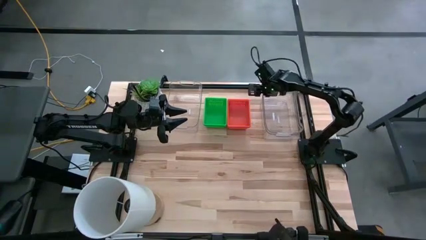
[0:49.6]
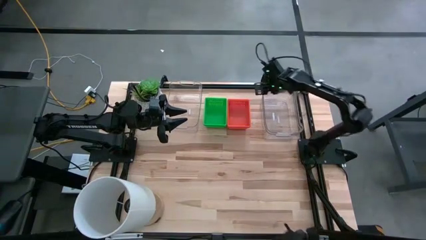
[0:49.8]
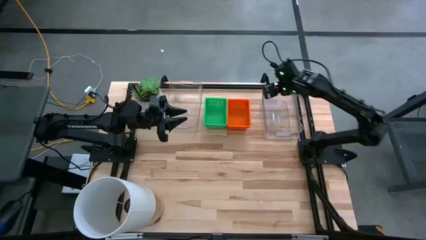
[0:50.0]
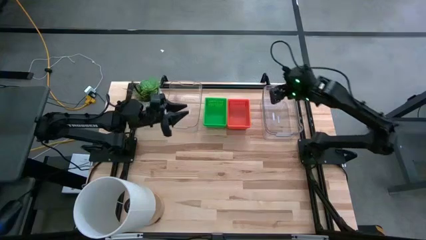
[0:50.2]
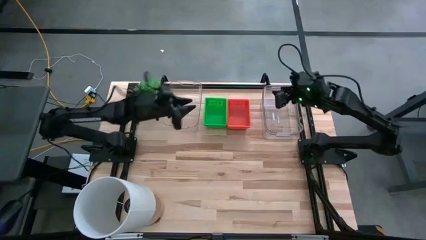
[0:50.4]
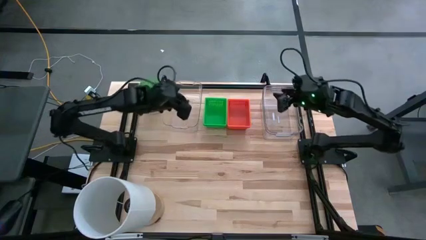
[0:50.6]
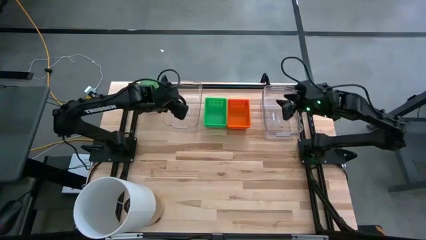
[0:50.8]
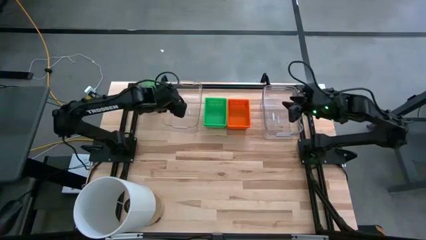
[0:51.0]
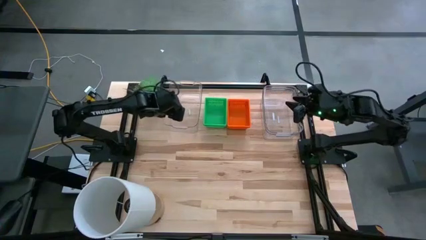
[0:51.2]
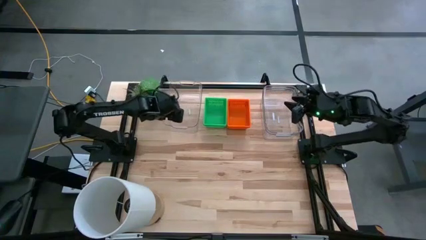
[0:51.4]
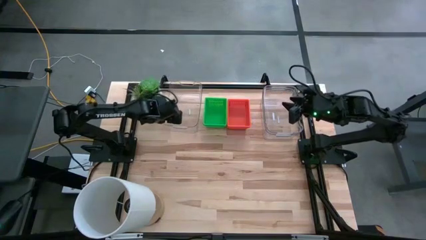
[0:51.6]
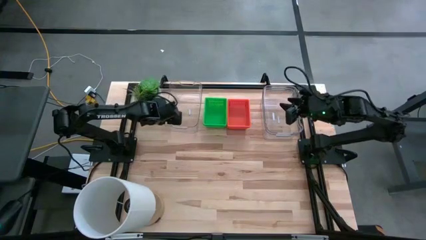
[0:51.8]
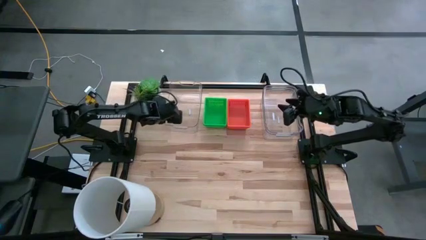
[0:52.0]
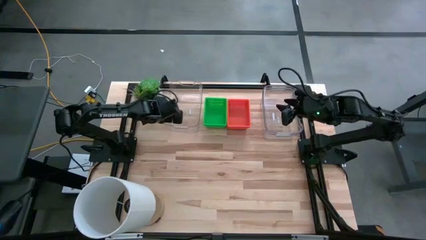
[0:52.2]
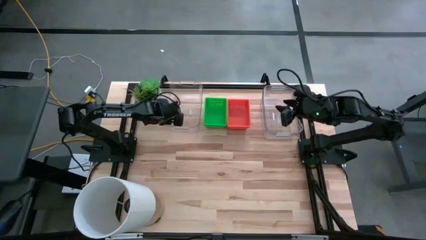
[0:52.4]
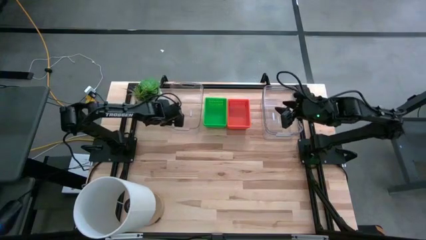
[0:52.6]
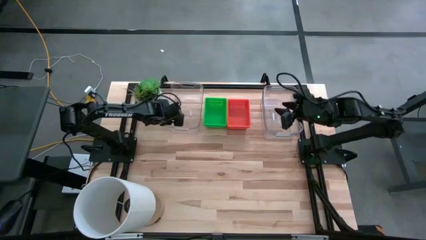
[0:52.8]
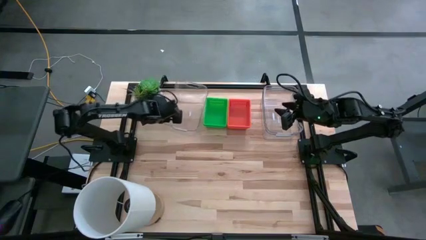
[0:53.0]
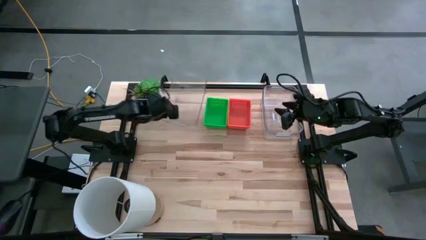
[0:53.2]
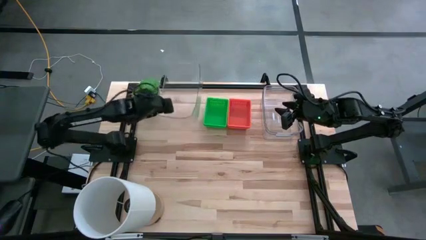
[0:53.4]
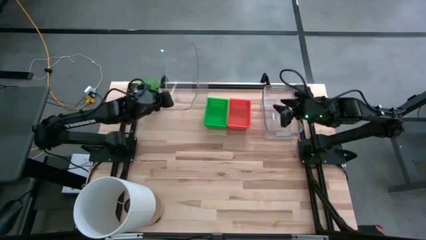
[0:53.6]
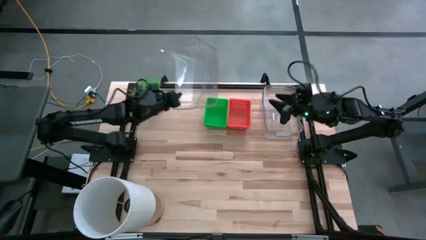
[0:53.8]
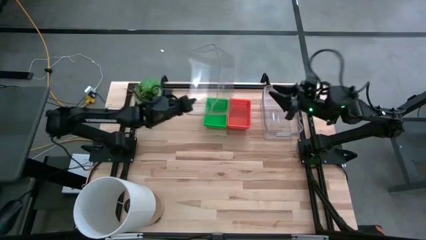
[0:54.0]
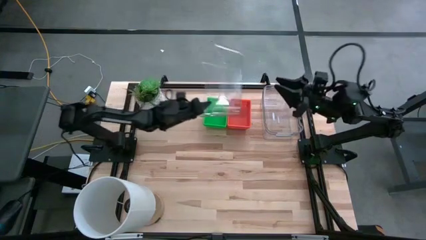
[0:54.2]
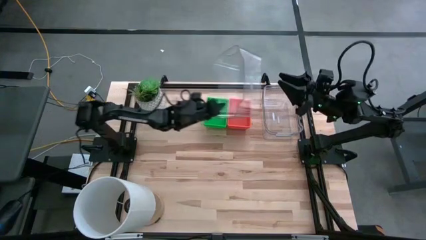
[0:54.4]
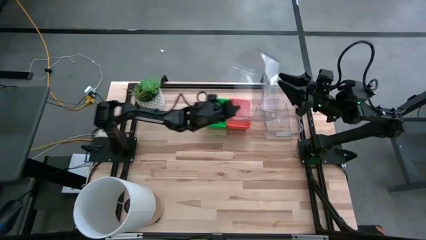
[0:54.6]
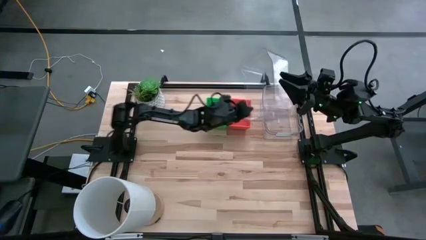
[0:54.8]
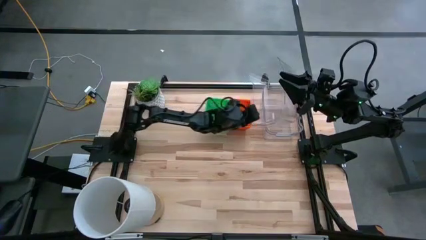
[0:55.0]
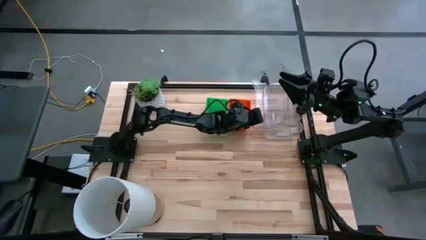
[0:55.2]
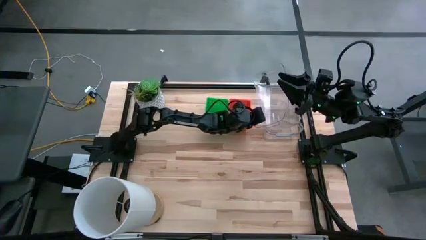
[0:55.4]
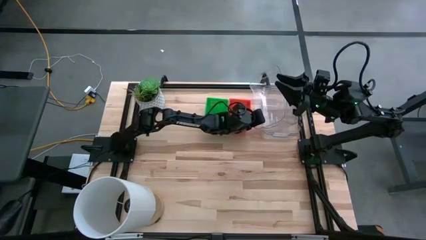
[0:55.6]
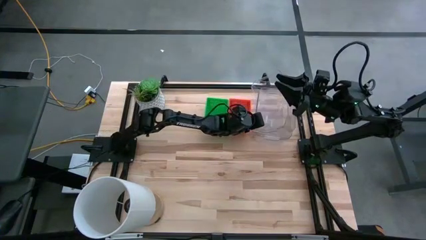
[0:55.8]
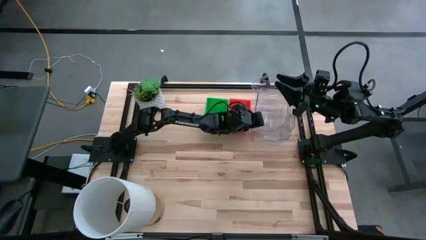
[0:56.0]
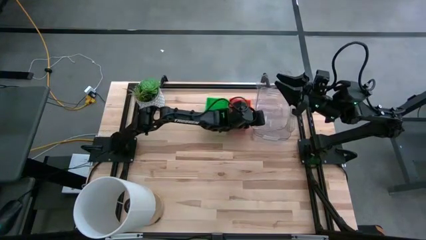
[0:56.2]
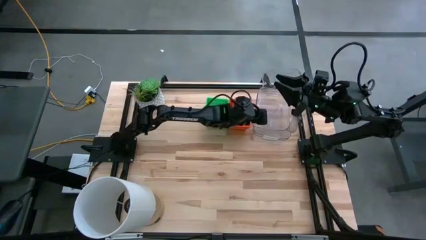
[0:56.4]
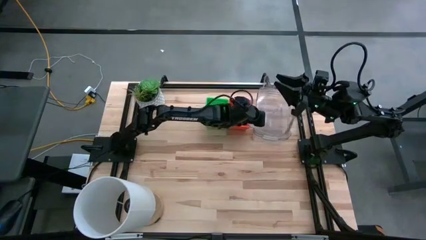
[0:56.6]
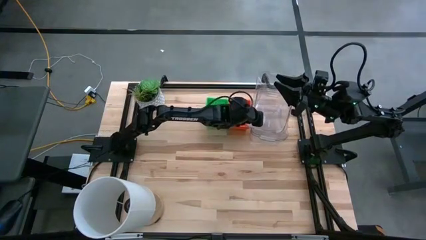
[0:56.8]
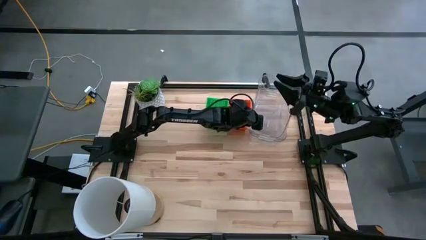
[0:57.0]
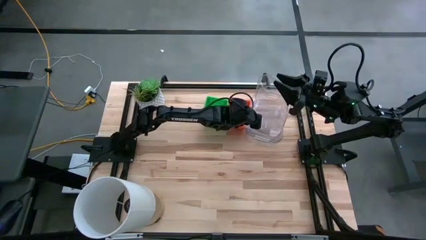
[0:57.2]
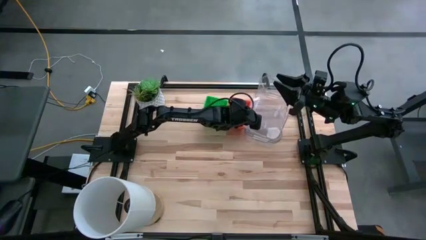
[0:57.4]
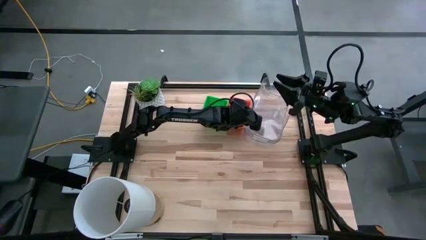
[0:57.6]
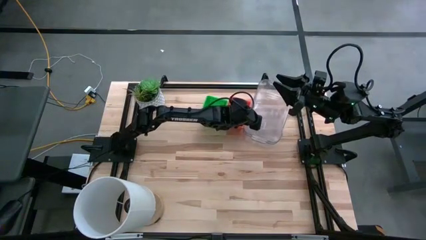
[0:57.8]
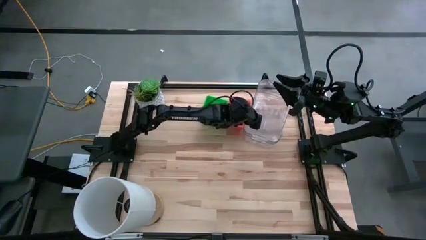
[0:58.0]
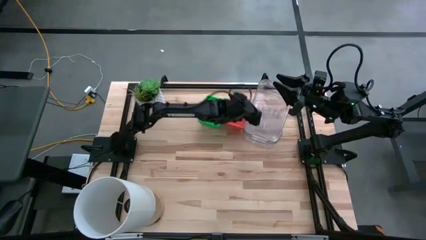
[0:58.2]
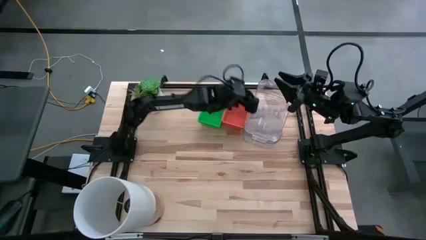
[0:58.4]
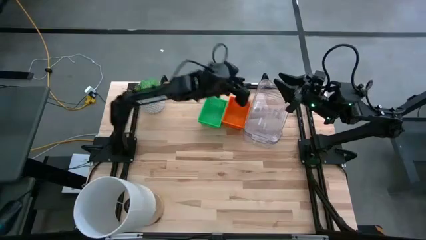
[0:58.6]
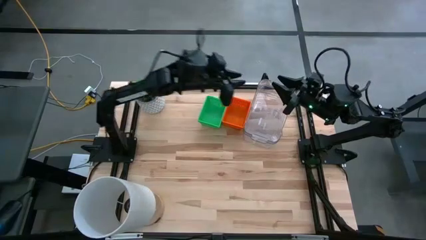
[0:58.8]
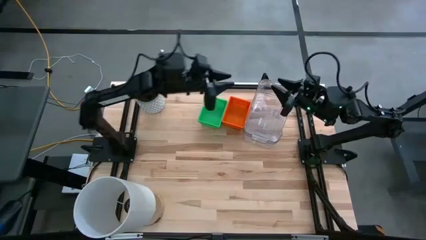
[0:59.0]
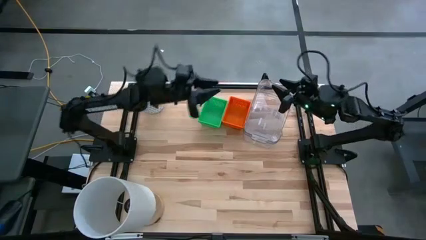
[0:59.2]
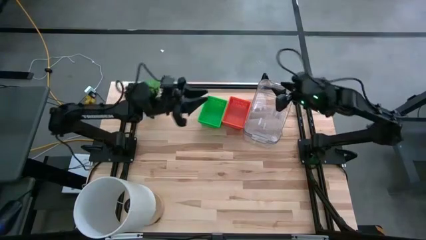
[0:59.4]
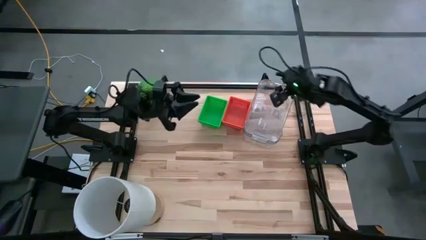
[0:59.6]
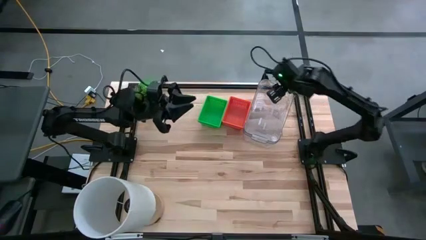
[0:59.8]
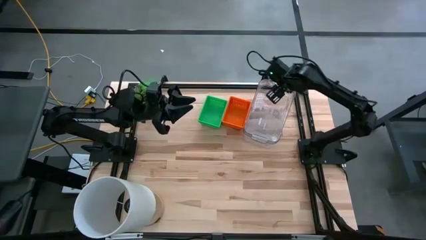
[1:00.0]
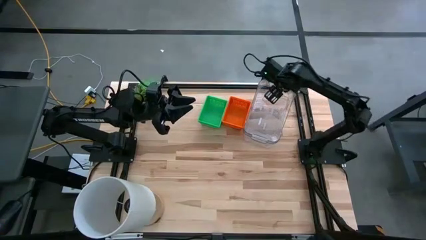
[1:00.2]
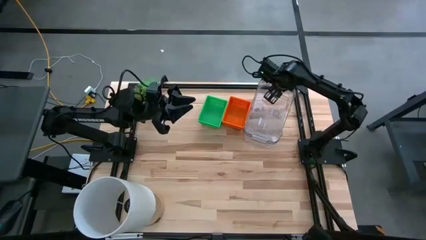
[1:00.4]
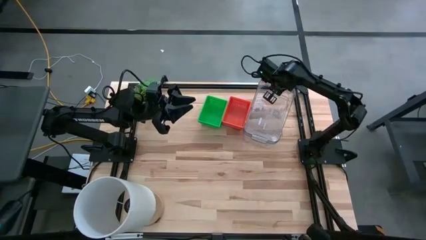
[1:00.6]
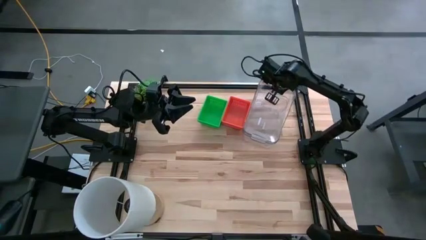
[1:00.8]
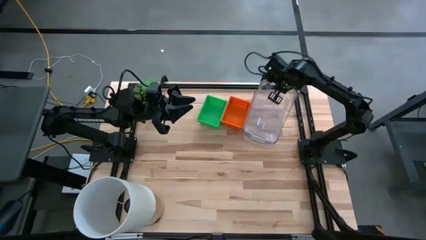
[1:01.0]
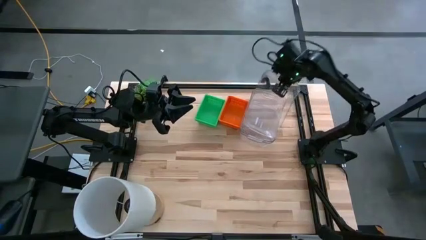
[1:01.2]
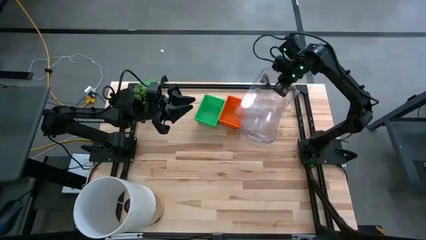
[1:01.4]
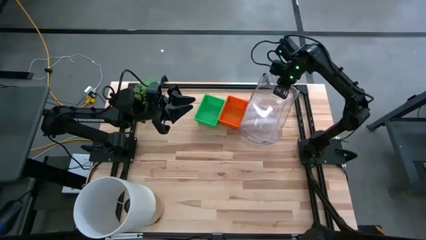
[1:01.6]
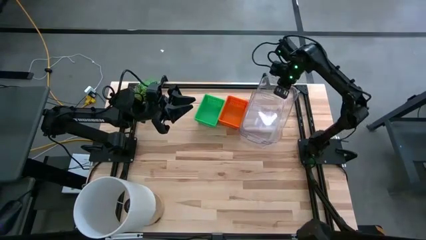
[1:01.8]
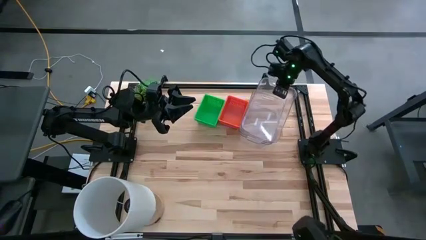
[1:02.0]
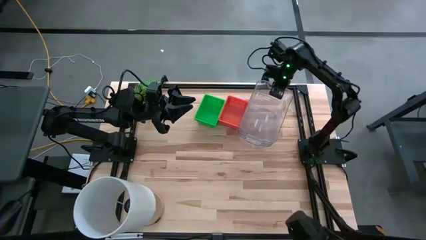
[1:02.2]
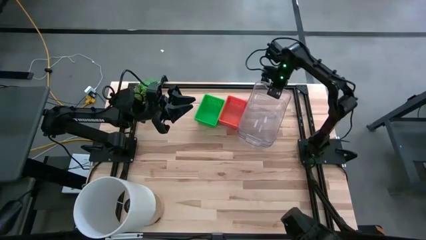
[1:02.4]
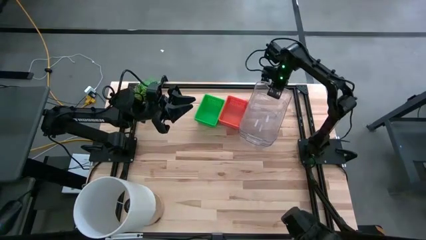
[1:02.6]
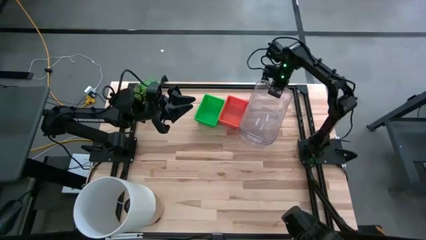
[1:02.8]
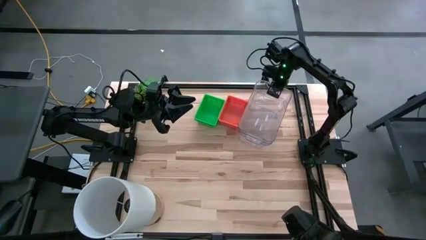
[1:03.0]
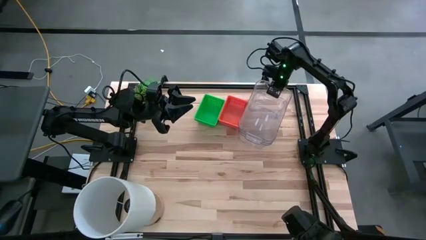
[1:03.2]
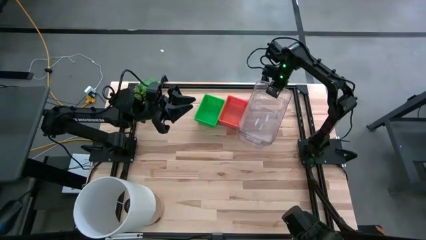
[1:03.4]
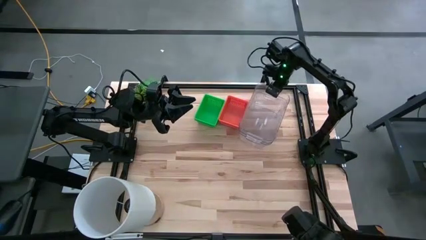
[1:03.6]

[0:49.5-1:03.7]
Stack the left transparent bin on the right transparent bins
